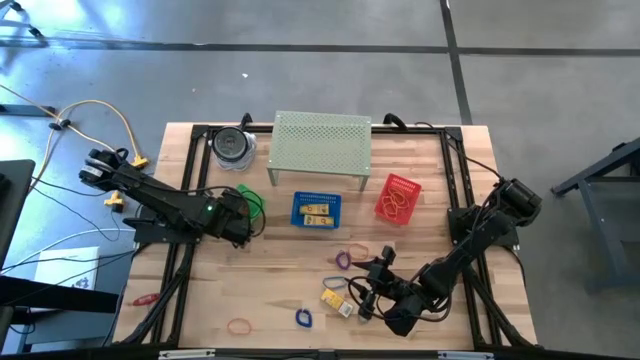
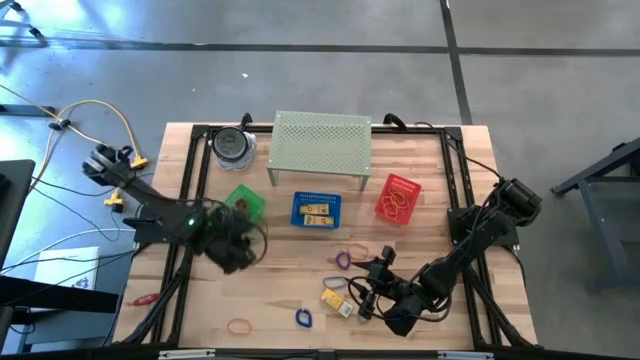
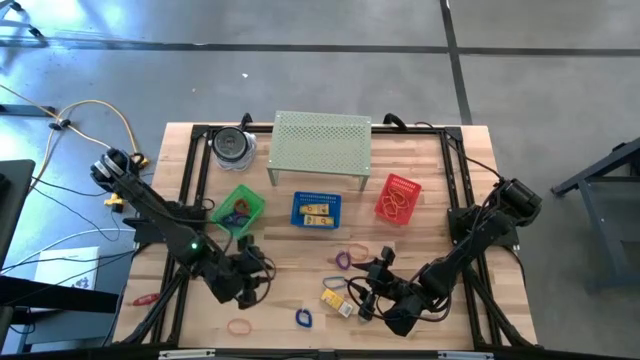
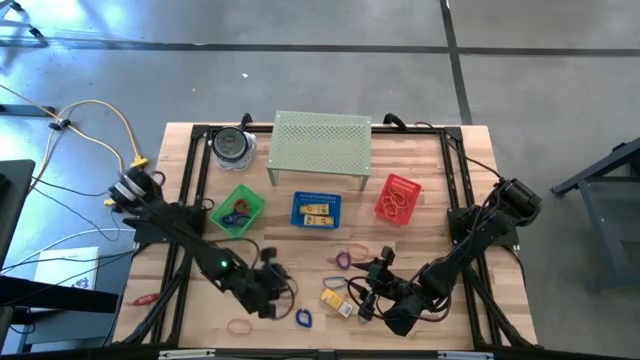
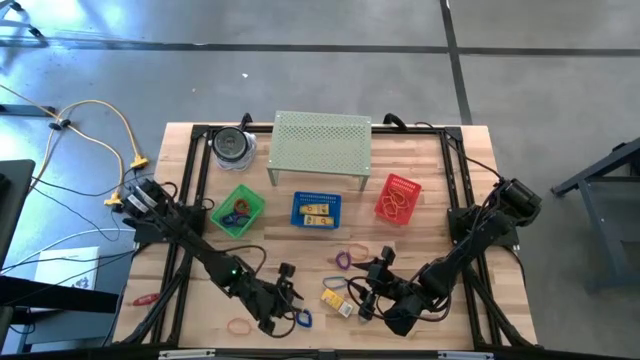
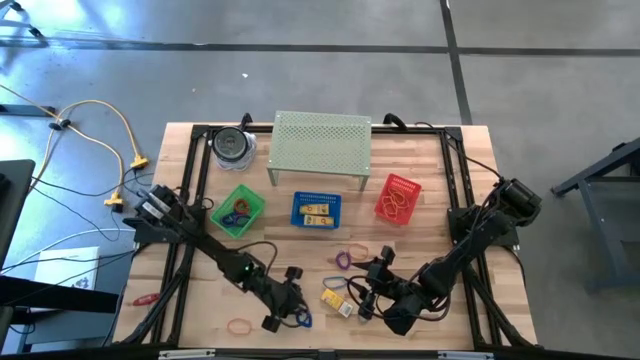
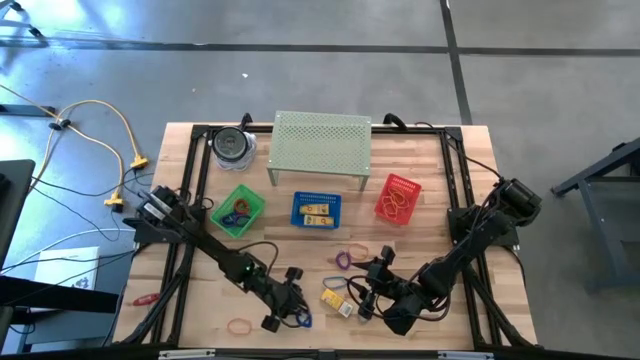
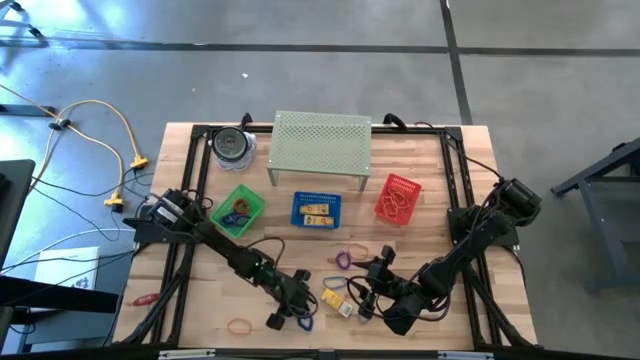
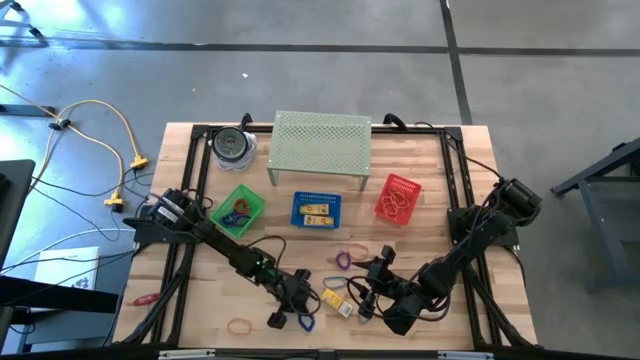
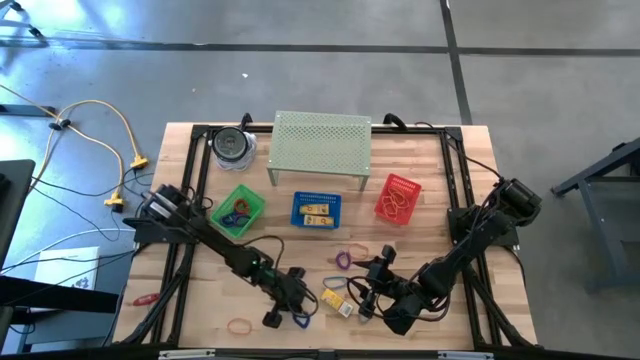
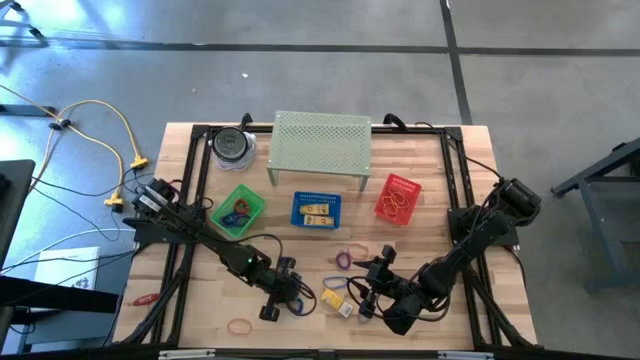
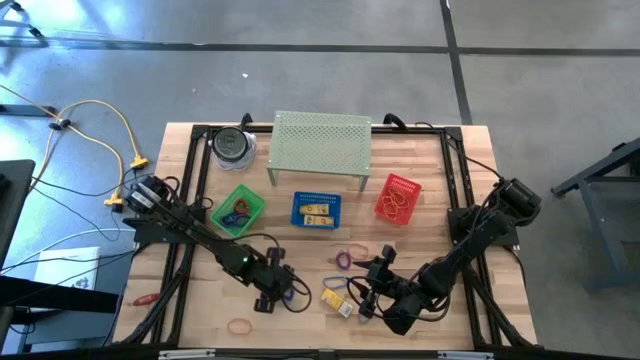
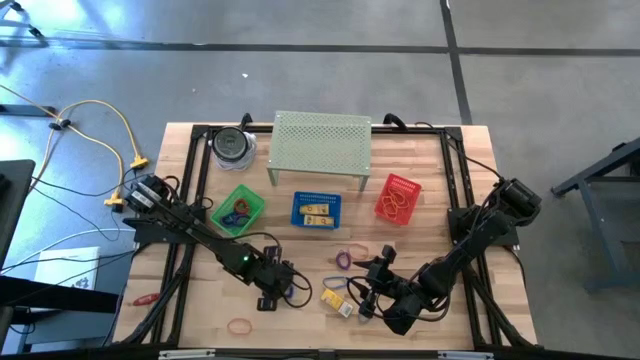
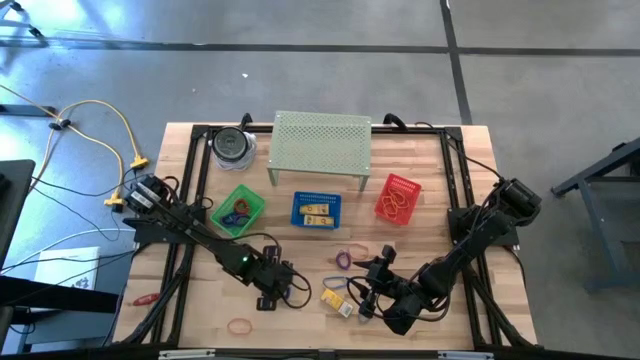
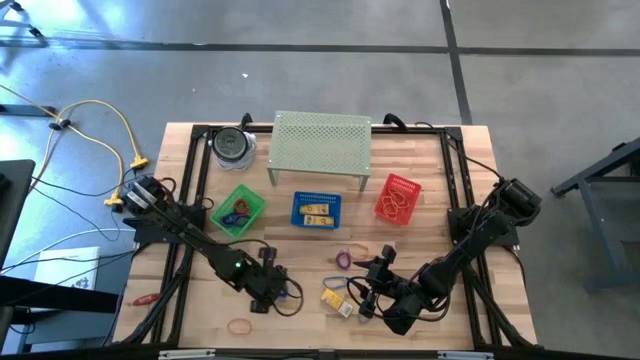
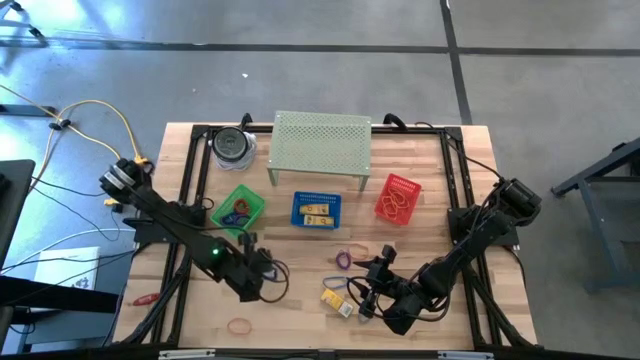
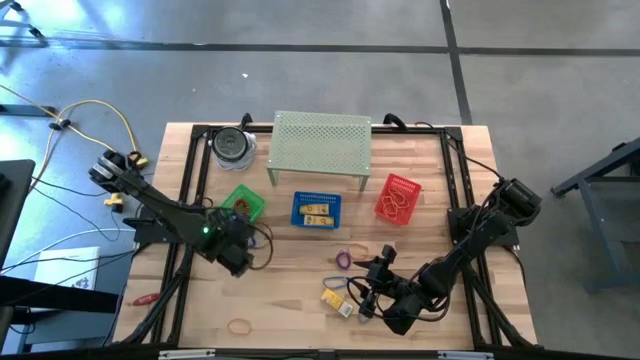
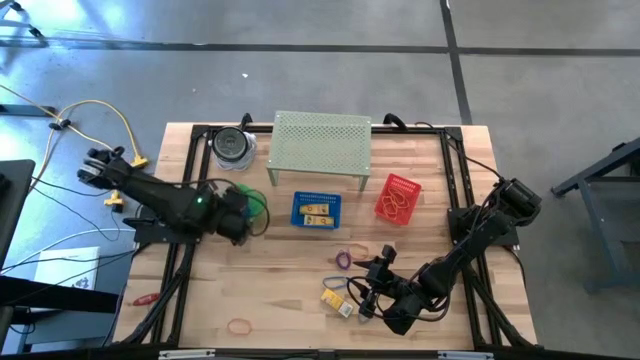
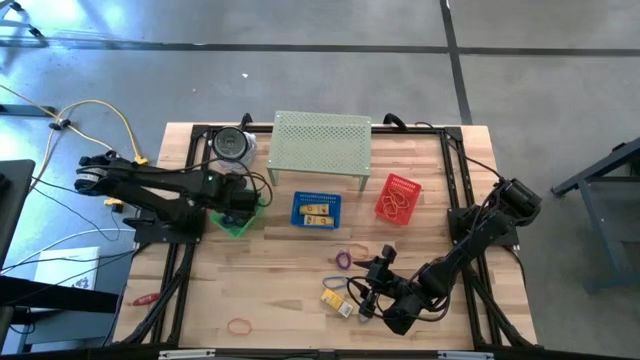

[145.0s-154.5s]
Task: Pick & Place Office Desk Supplies
Put the blue spring keychain into the green bin

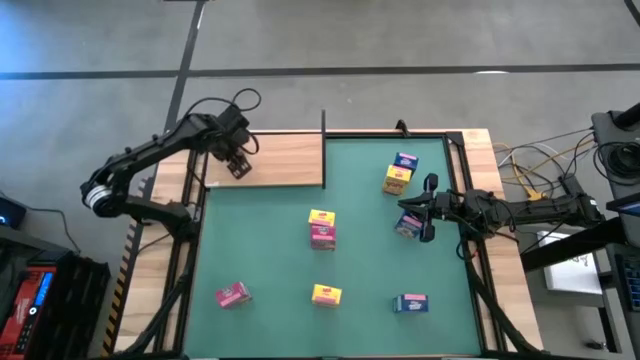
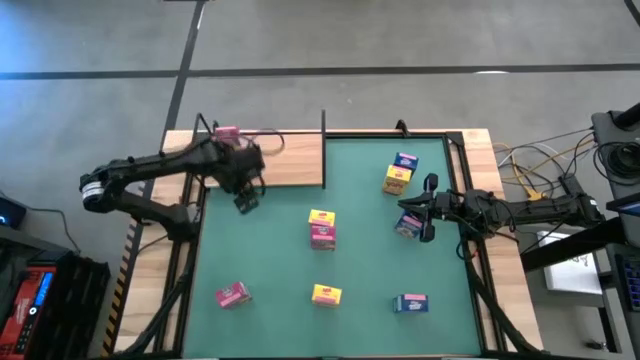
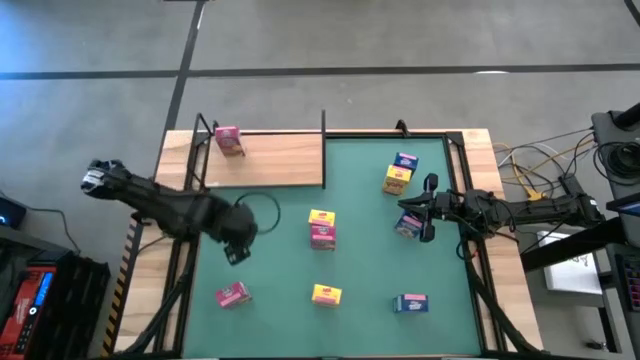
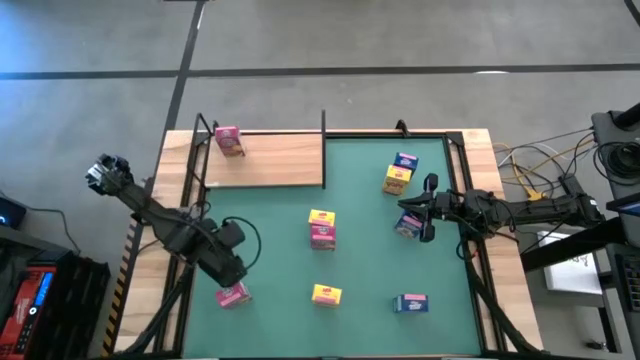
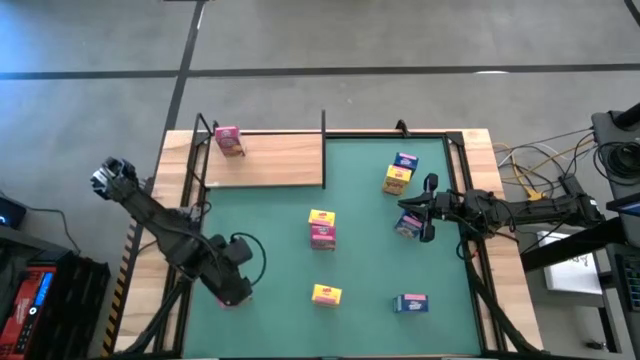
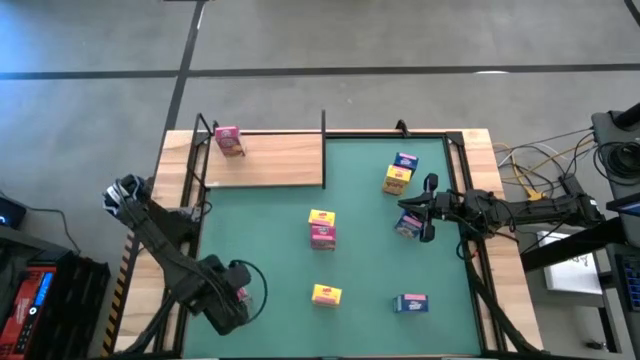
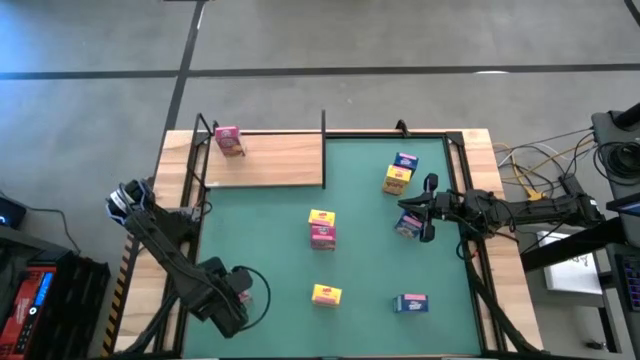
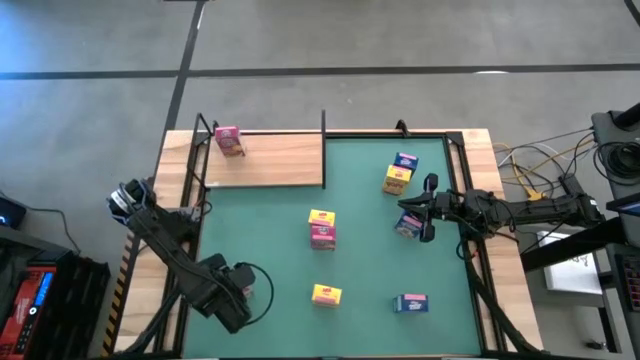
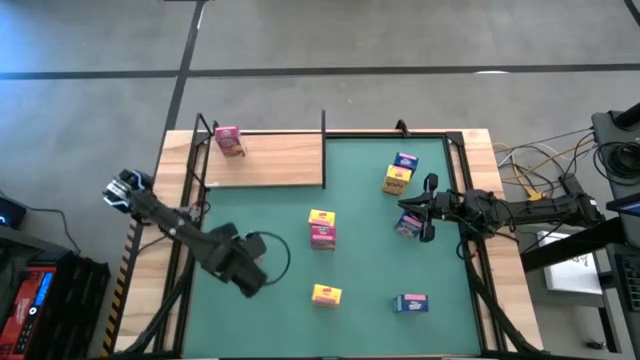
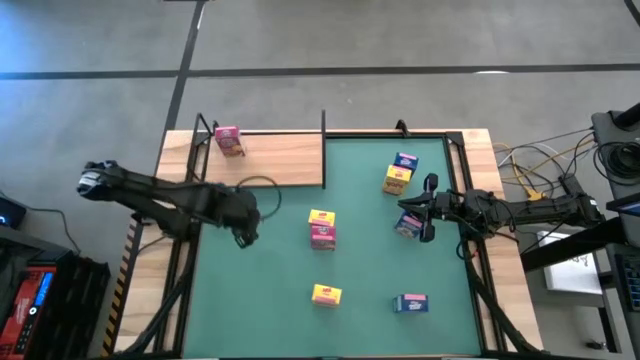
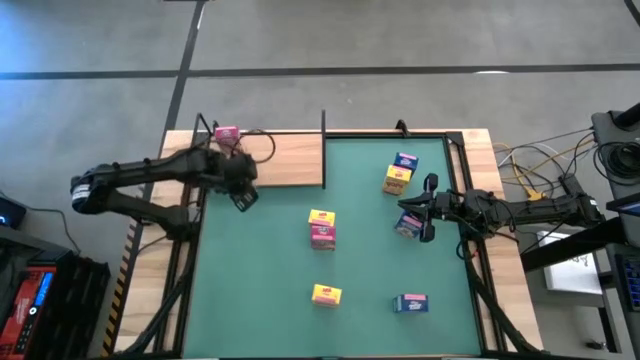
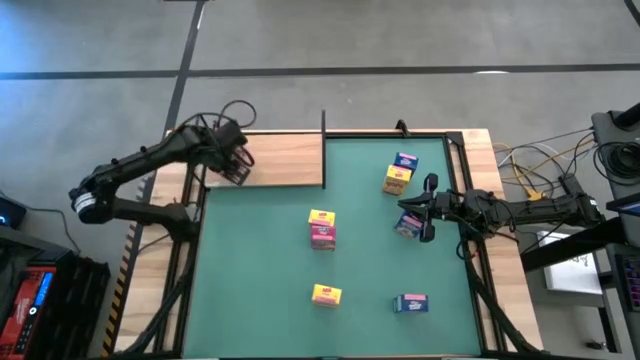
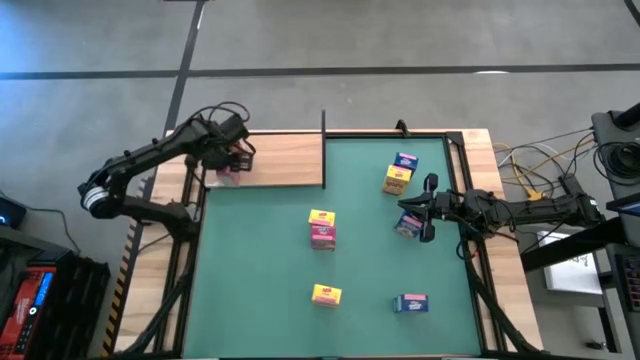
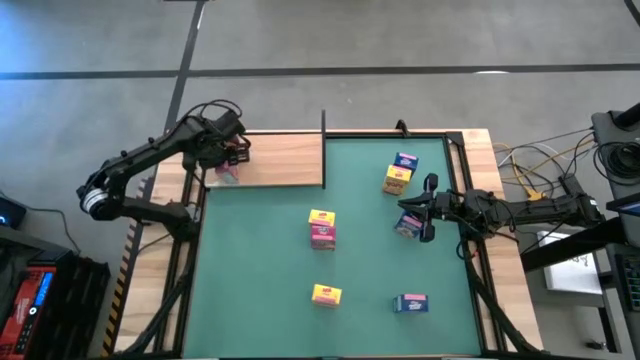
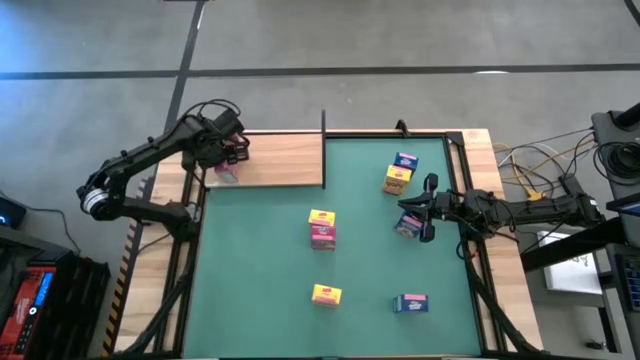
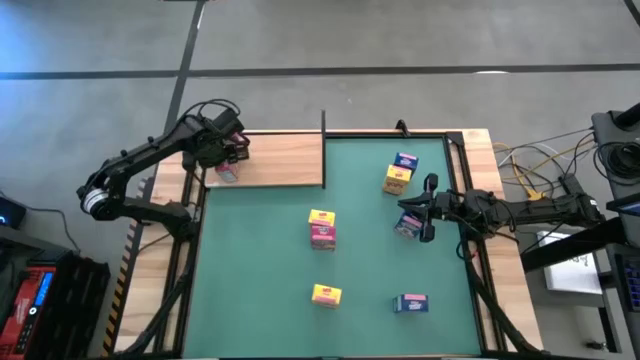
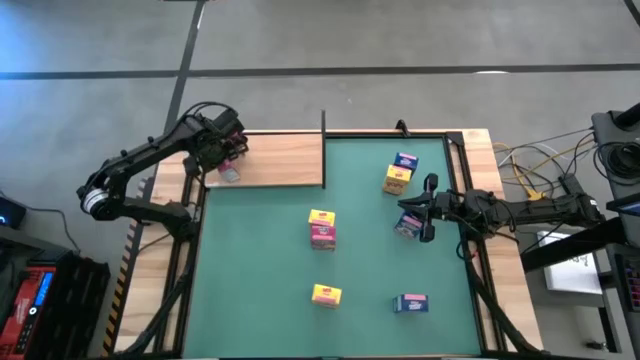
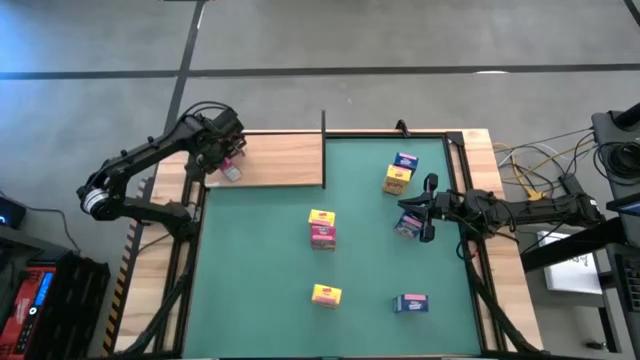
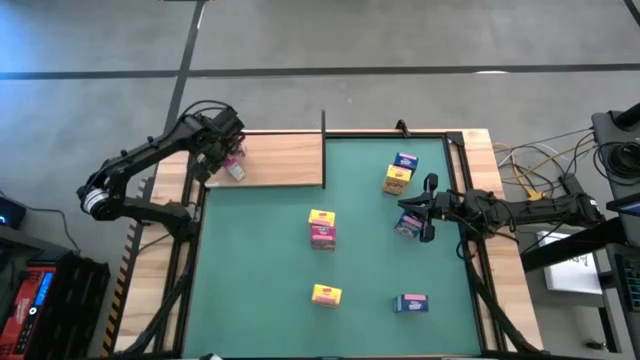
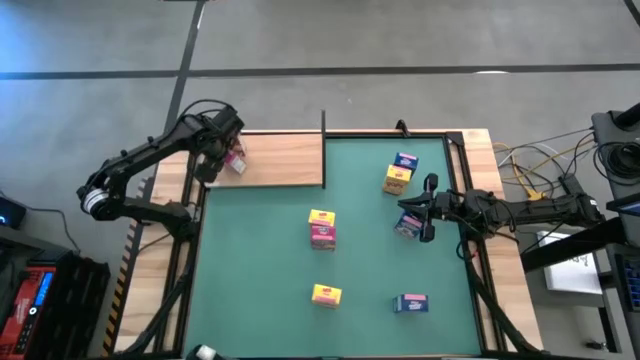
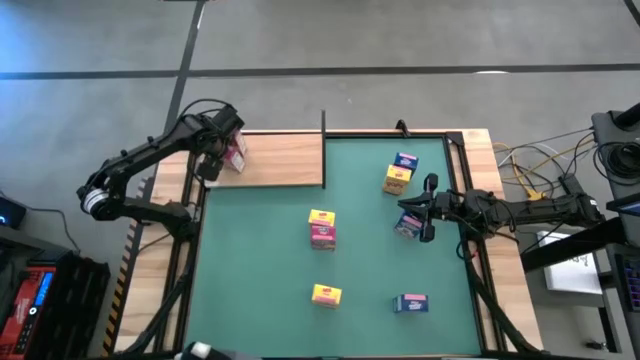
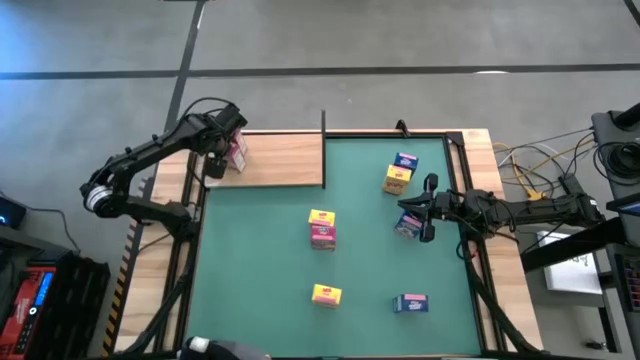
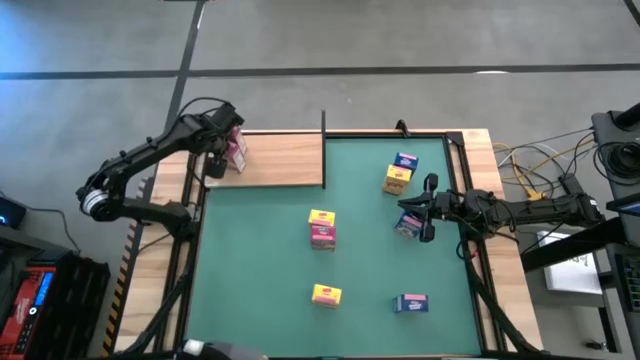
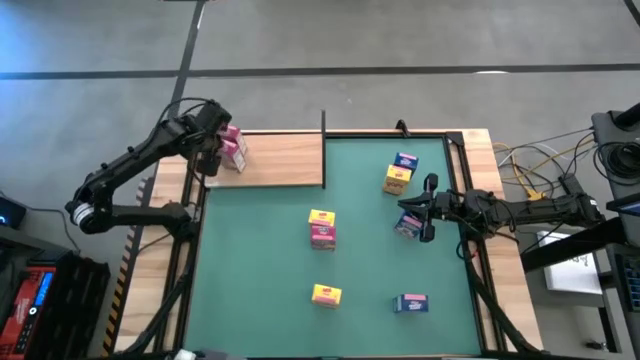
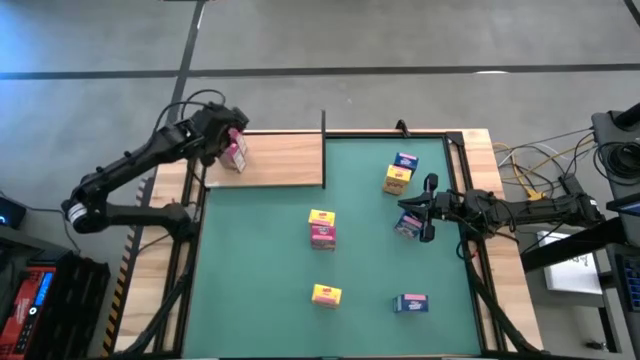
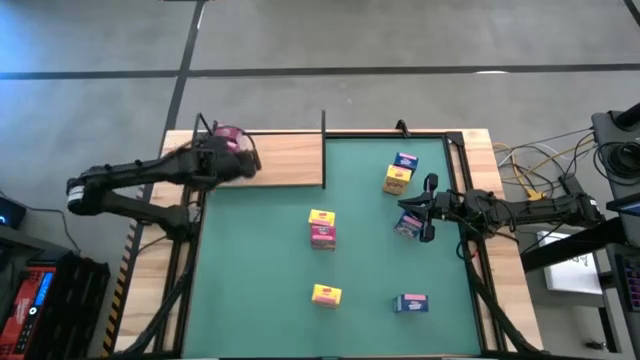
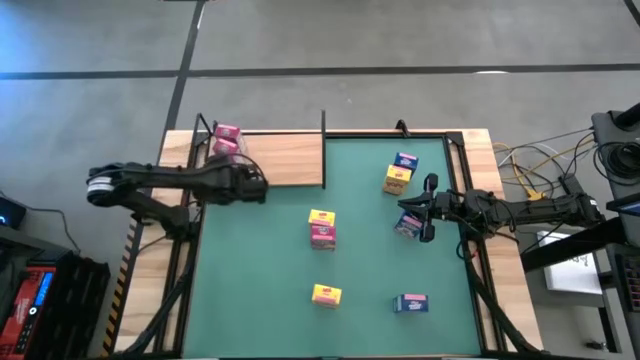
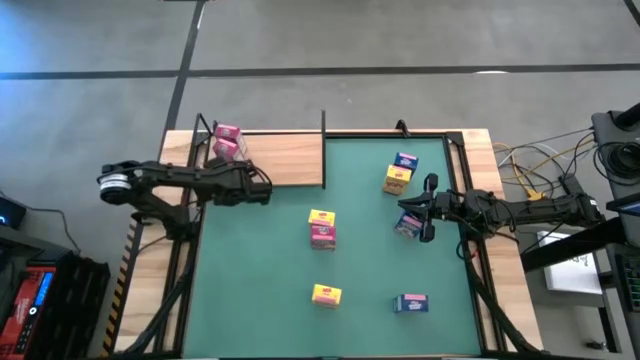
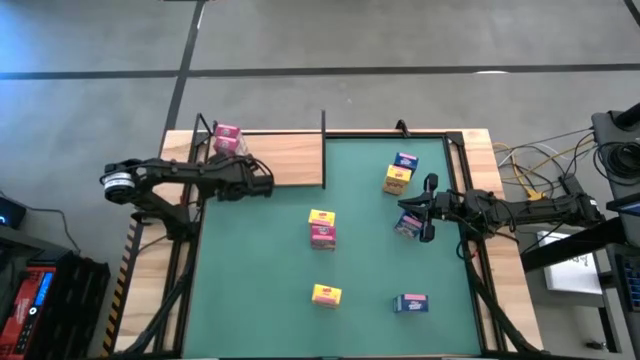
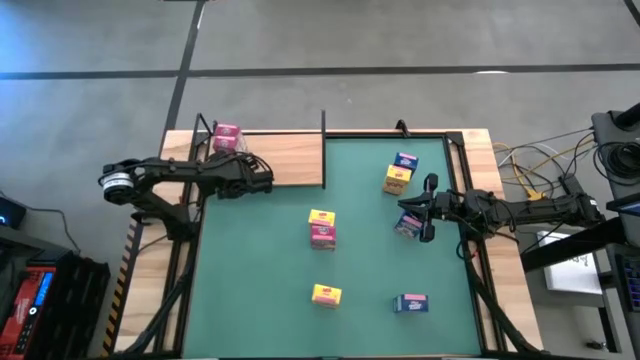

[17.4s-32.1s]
Task: Stack cereal on shelf
Put the bottom pink cereal box on the shelf aligned with the pink cereal box
